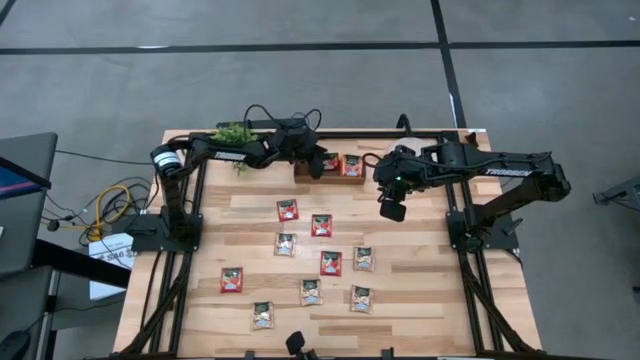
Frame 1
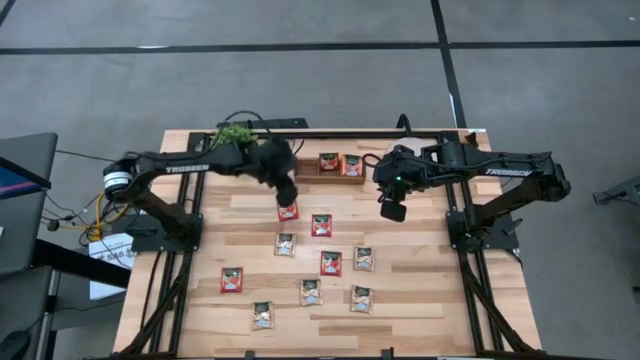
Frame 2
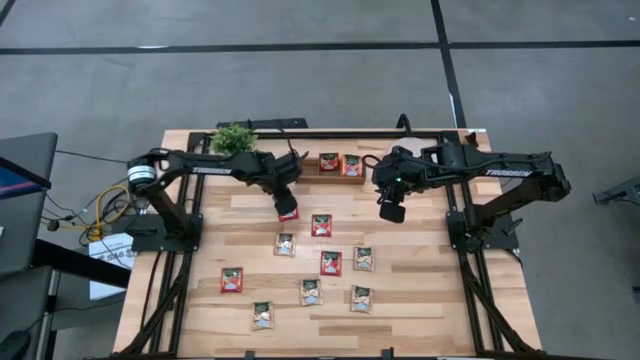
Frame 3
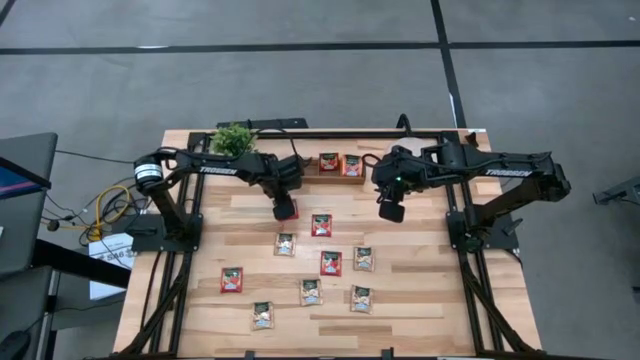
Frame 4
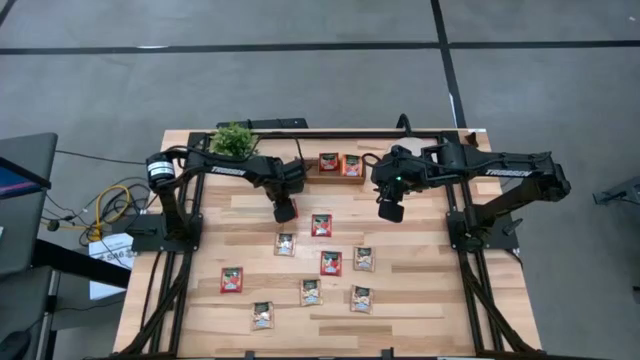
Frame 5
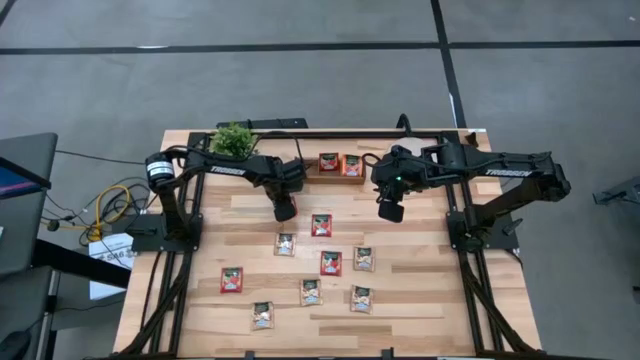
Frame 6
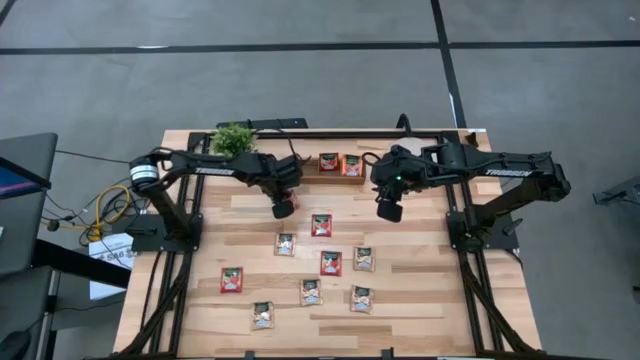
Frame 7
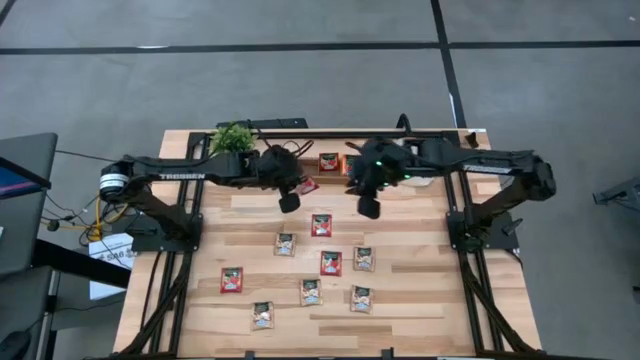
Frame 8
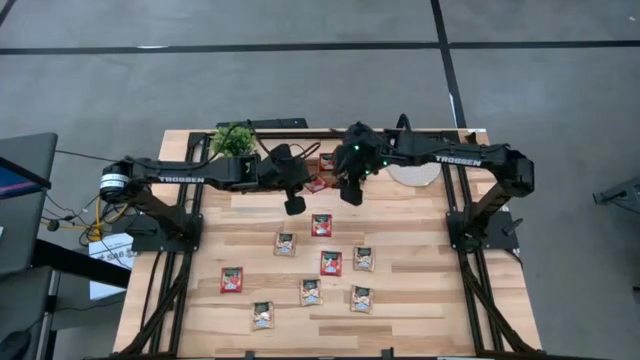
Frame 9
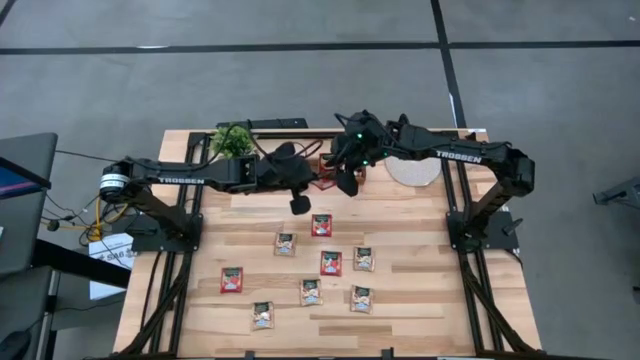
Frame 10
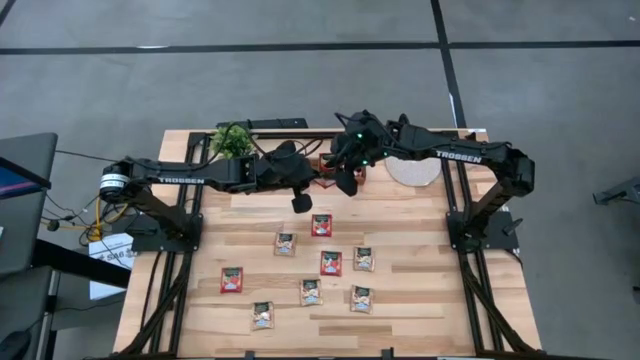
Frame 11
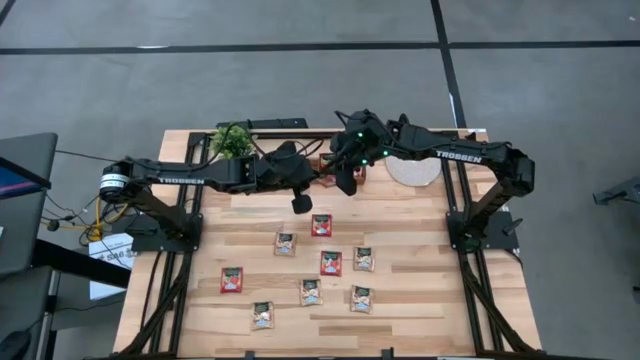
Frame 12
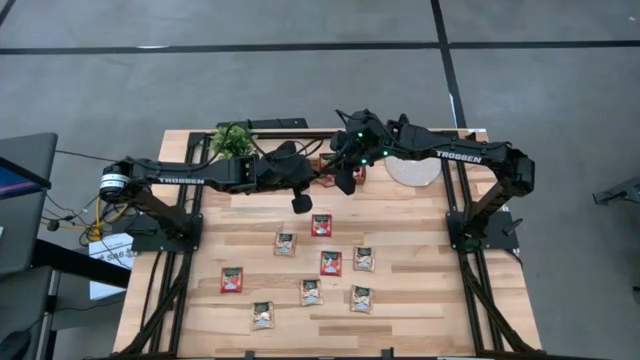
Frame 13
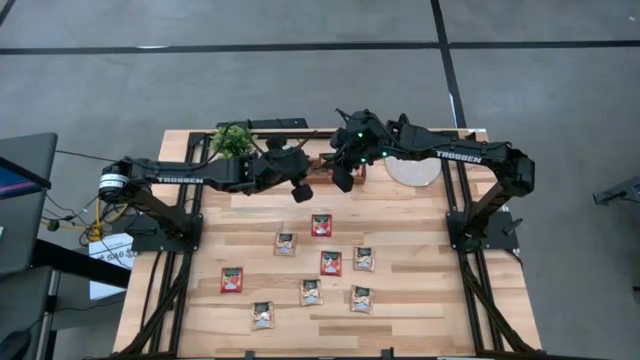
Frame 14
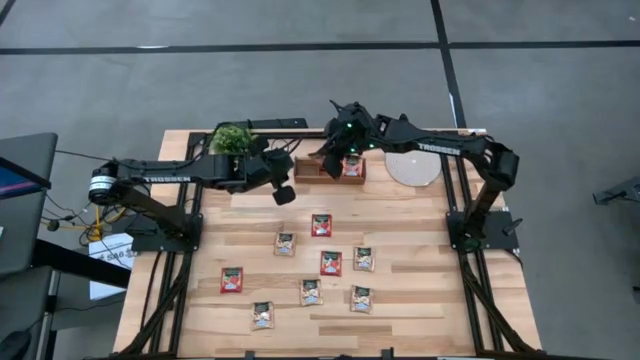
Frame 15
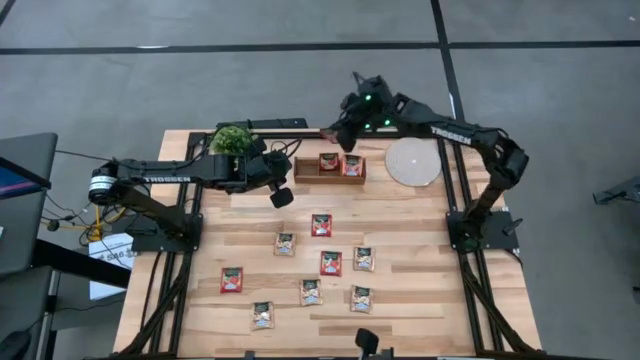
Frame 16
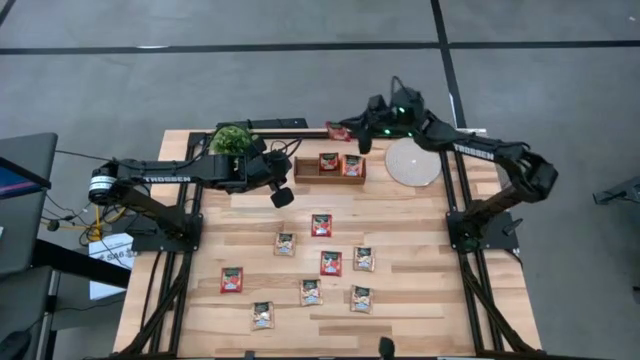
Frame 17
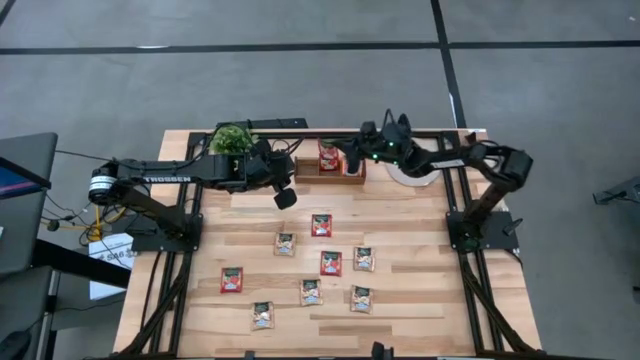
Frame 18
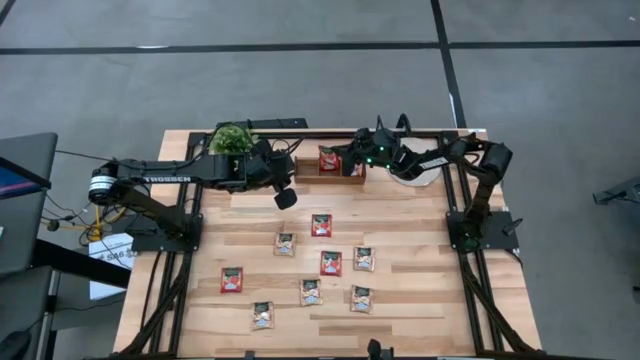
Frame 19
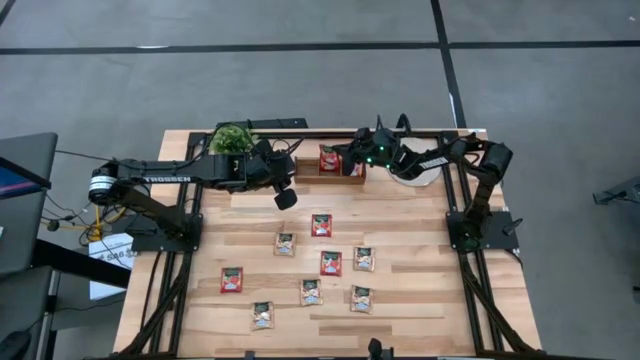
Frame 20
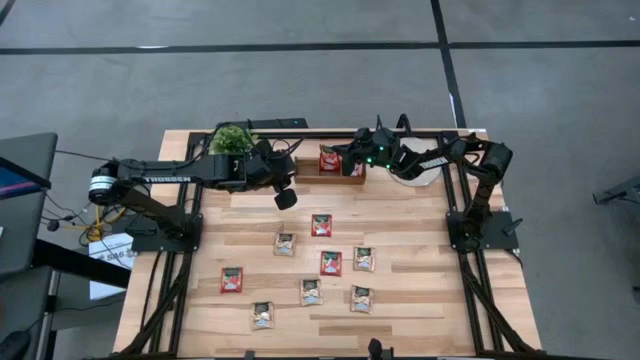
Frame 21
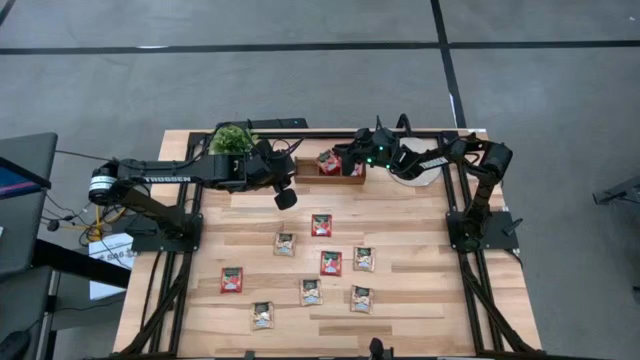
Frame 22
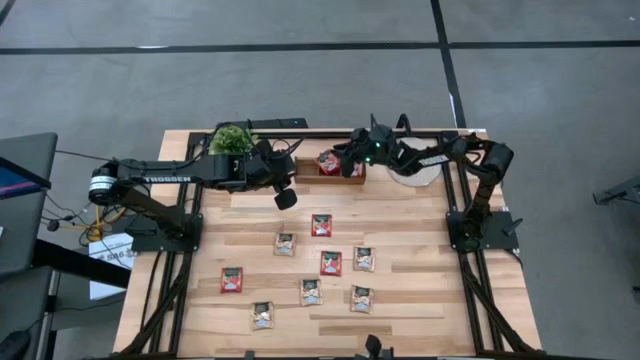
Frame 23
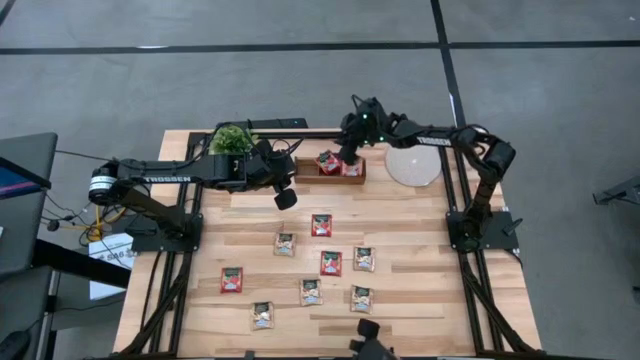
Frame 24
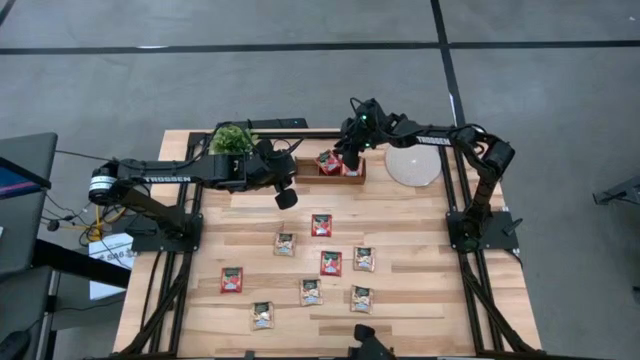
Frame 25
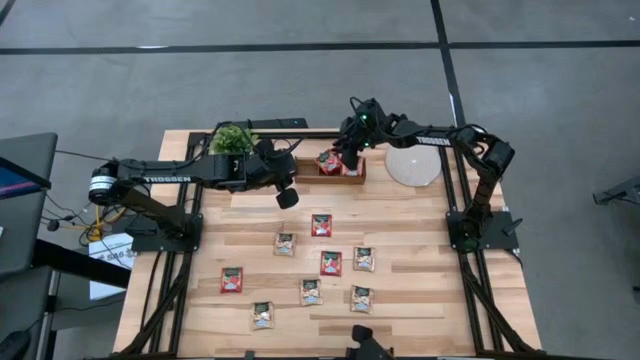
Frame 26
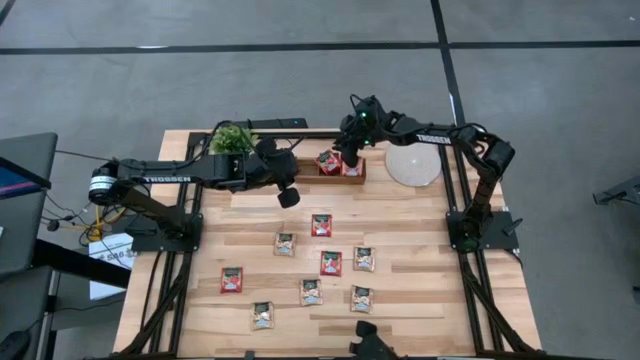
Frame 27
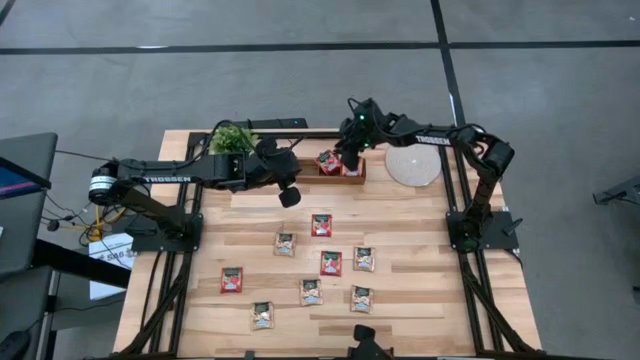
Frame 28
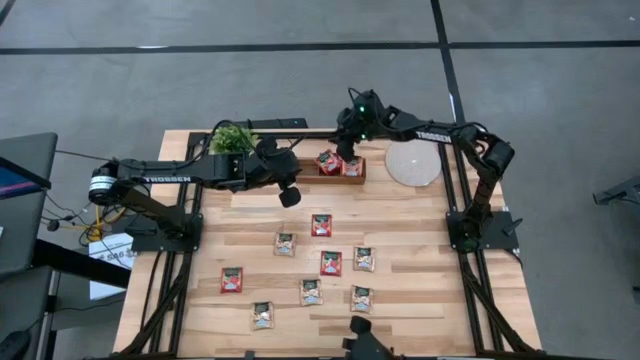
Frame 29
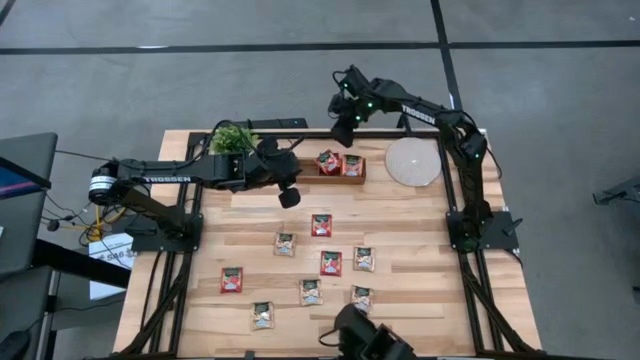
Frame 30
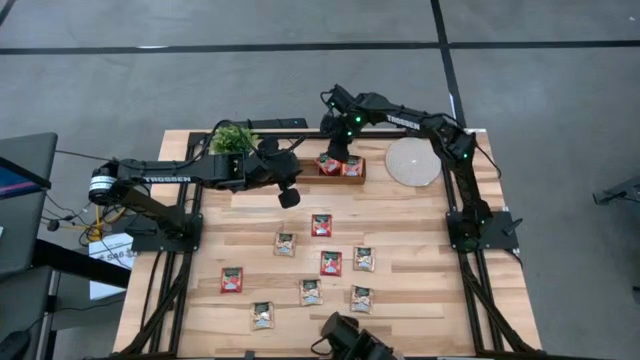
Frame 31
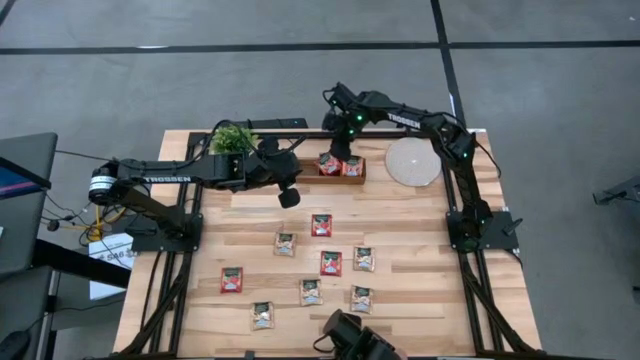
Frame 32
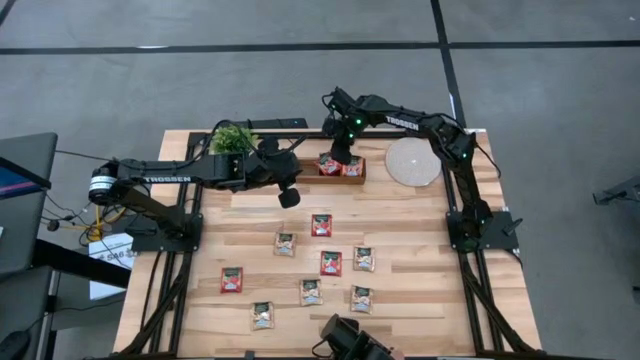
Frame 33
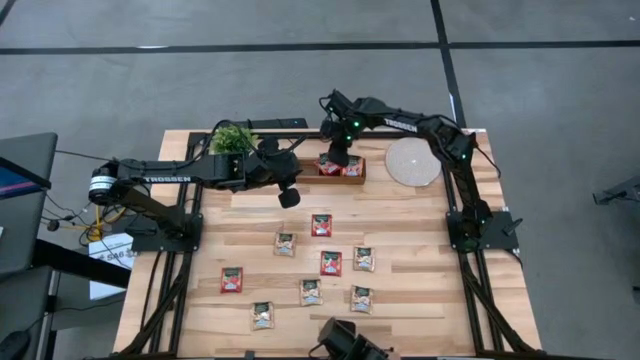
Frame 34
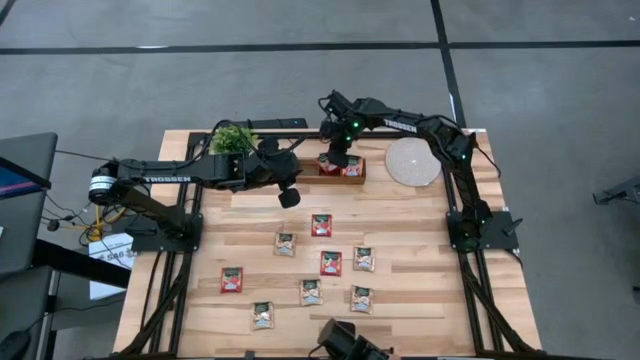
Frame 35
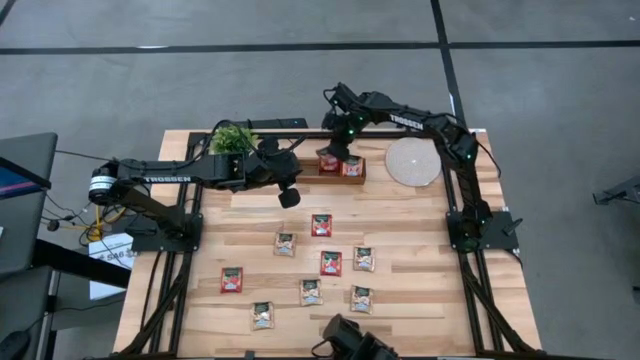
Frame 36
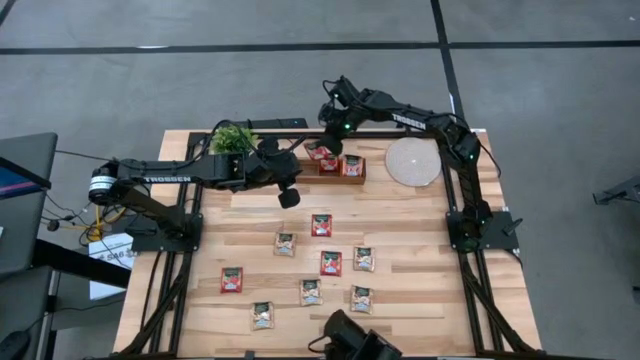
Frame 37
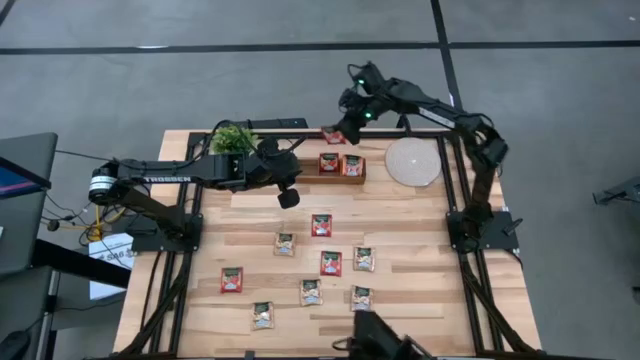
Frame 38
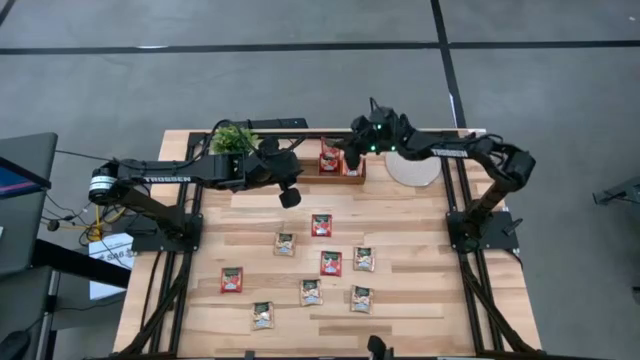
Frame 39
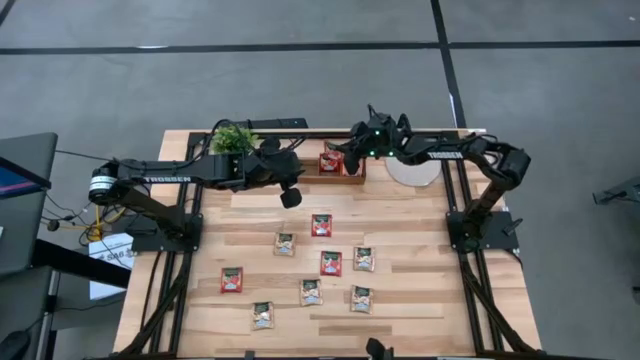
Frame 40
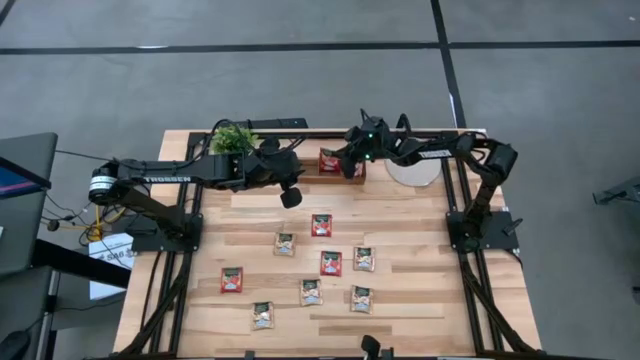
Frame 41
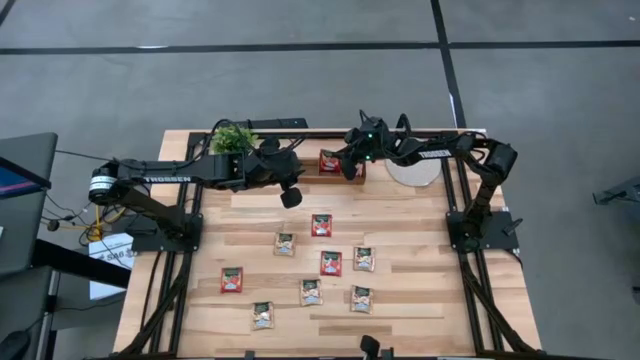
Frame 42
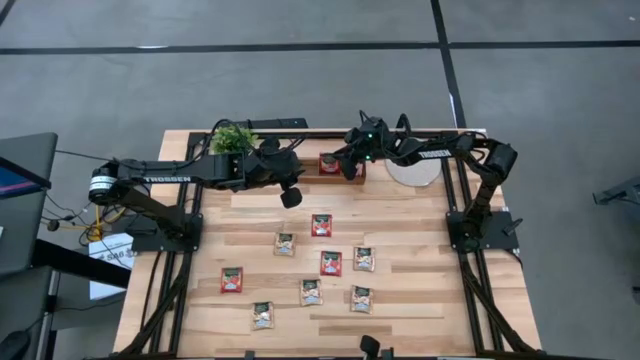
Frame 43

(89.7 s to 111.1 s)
Task: Pick & Place Tea
Put the red tea bag into the middle section of the wooden organizer
